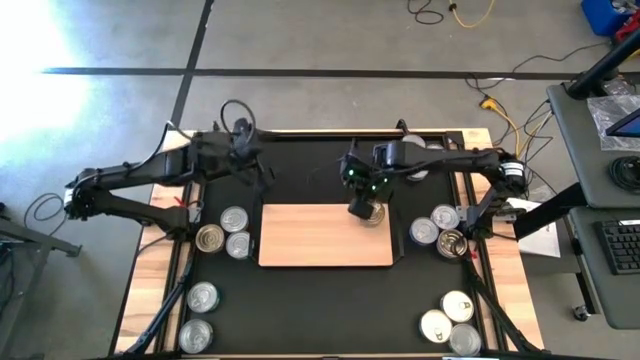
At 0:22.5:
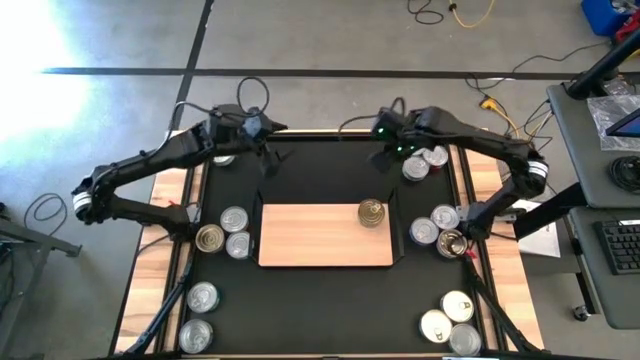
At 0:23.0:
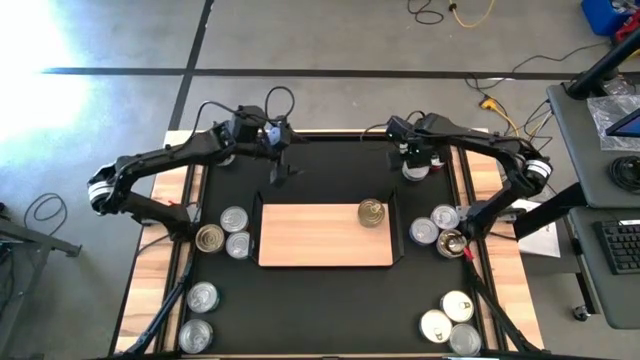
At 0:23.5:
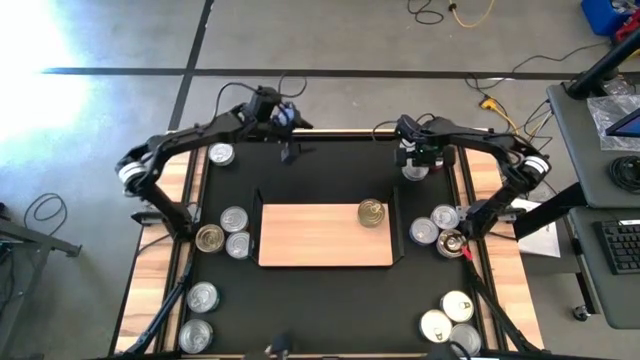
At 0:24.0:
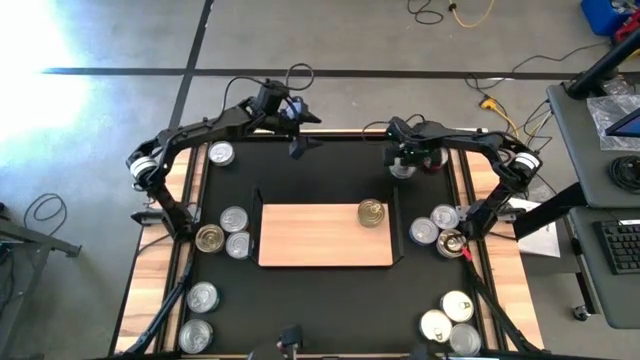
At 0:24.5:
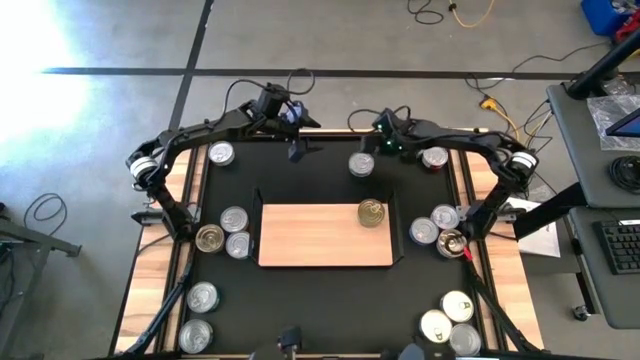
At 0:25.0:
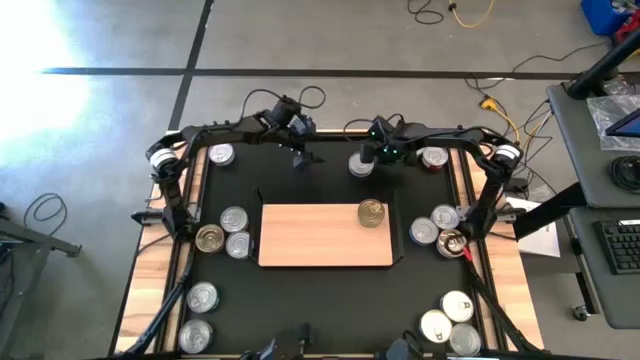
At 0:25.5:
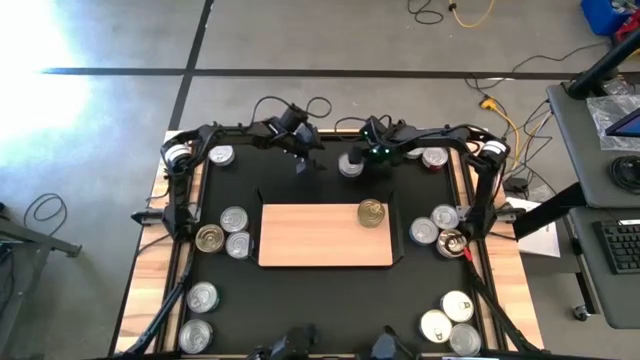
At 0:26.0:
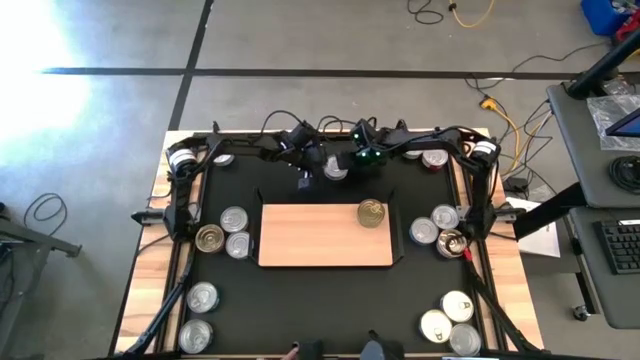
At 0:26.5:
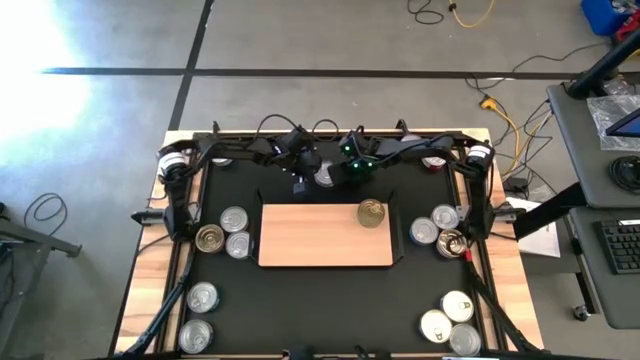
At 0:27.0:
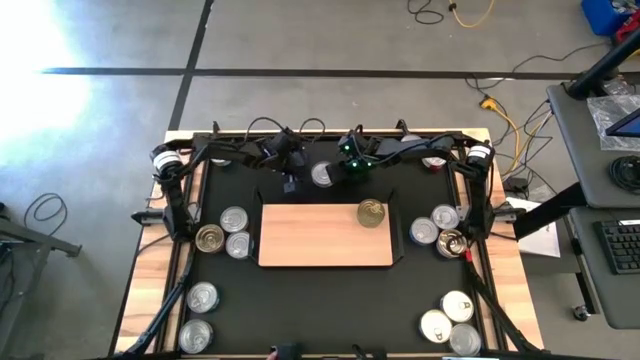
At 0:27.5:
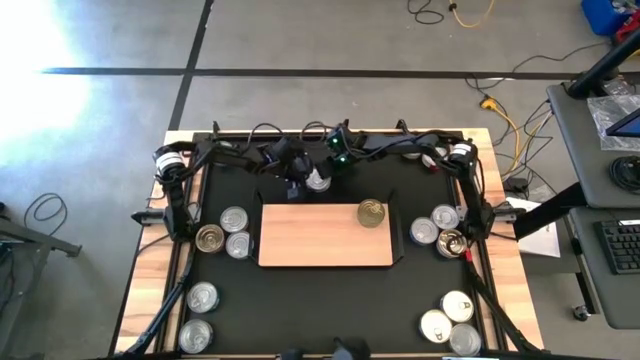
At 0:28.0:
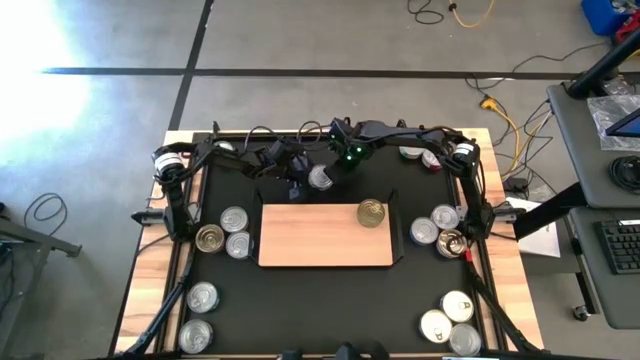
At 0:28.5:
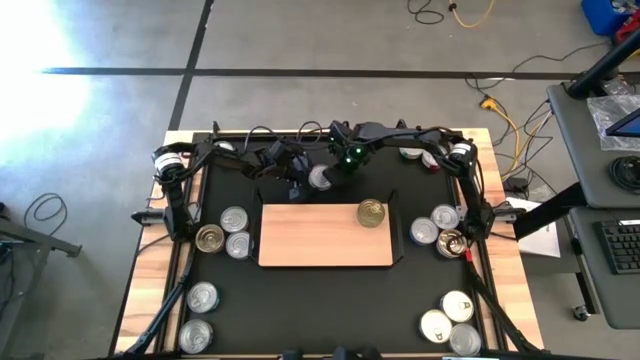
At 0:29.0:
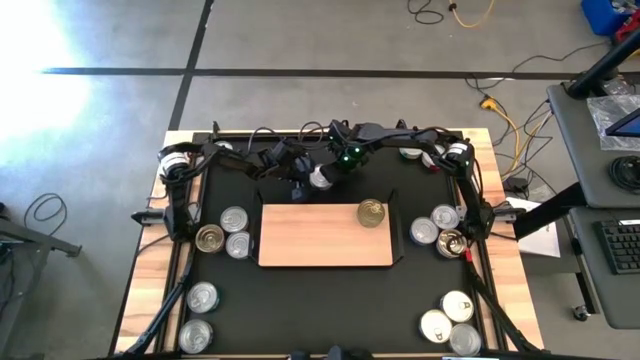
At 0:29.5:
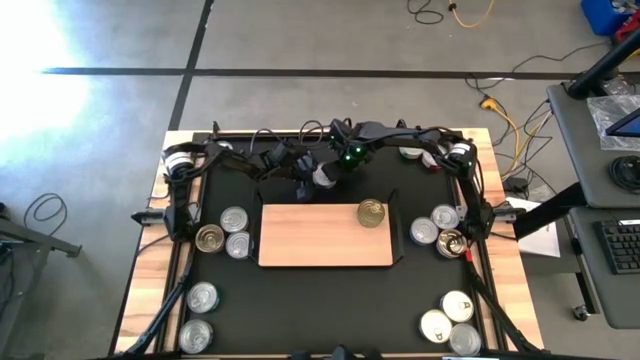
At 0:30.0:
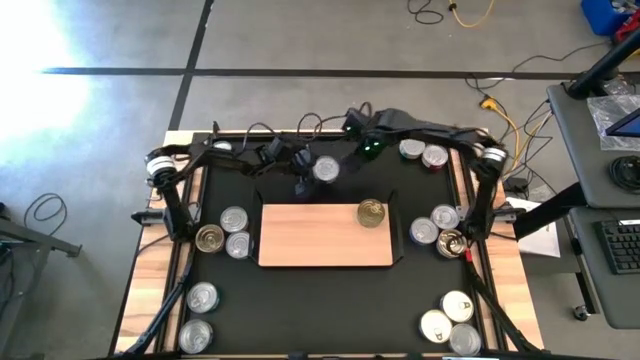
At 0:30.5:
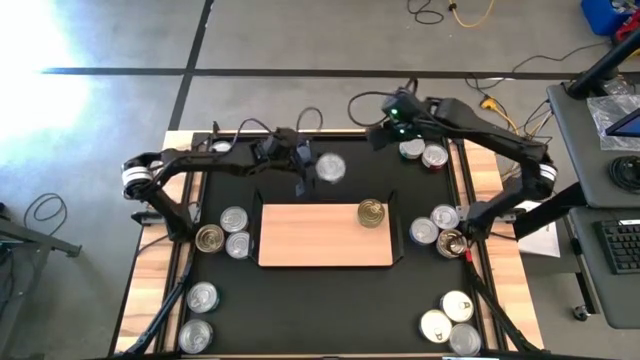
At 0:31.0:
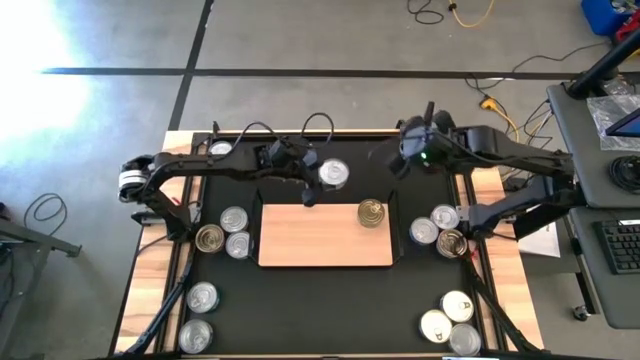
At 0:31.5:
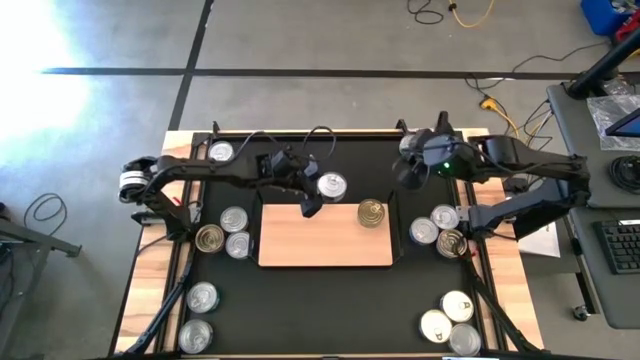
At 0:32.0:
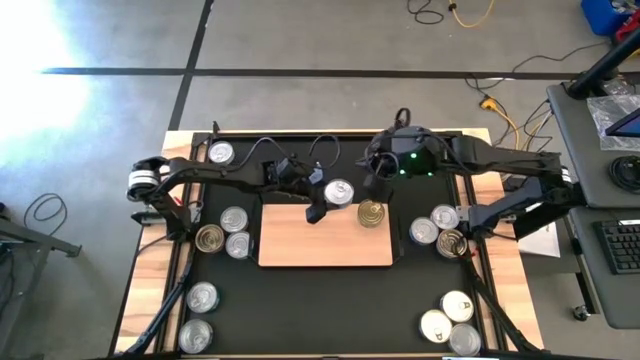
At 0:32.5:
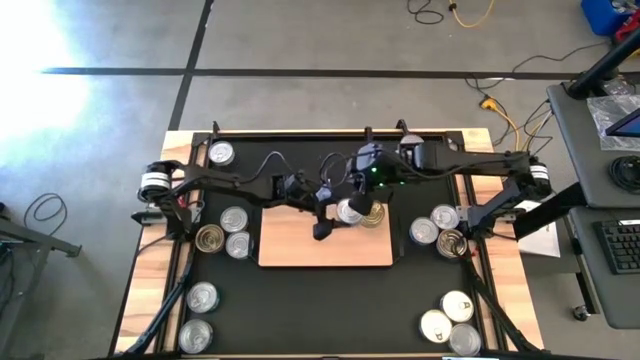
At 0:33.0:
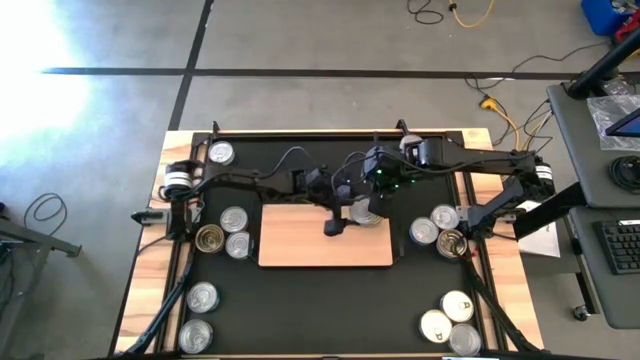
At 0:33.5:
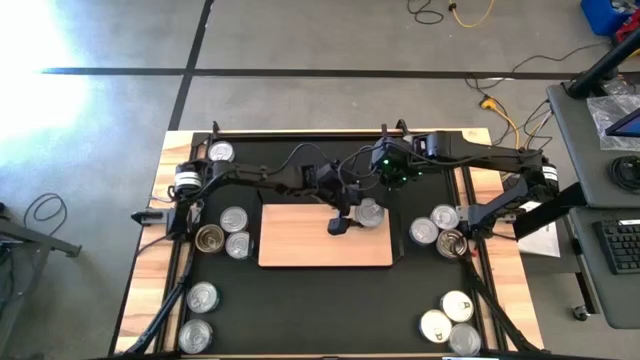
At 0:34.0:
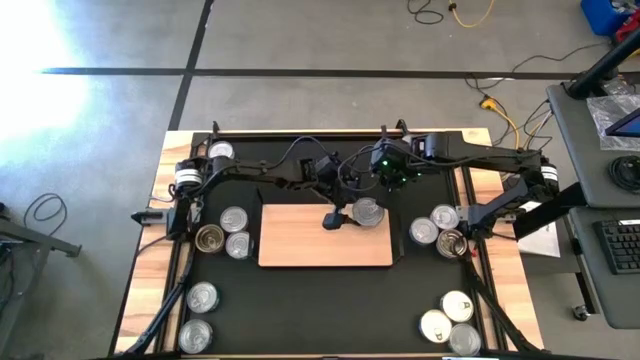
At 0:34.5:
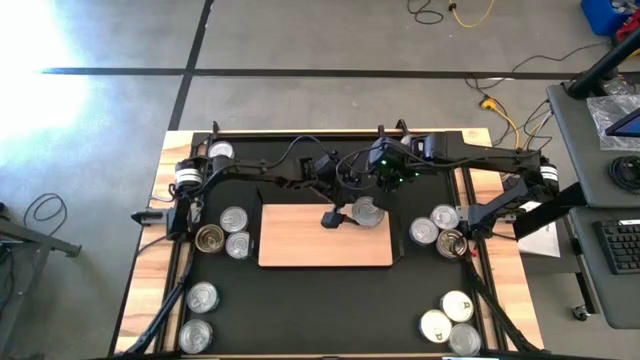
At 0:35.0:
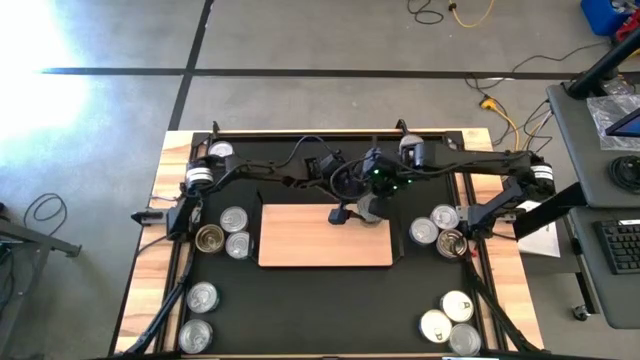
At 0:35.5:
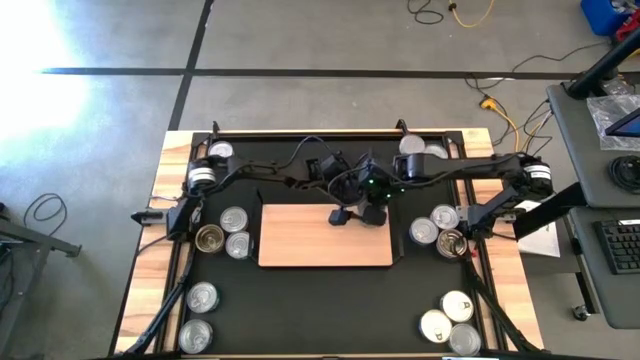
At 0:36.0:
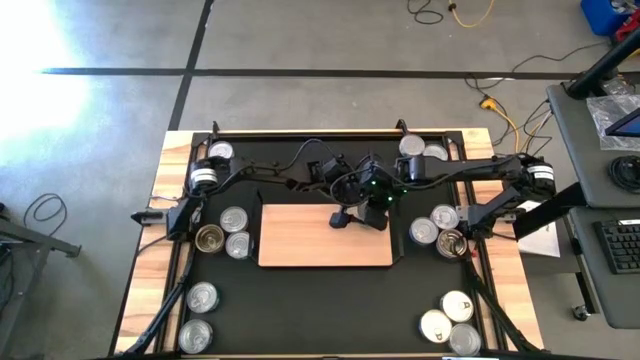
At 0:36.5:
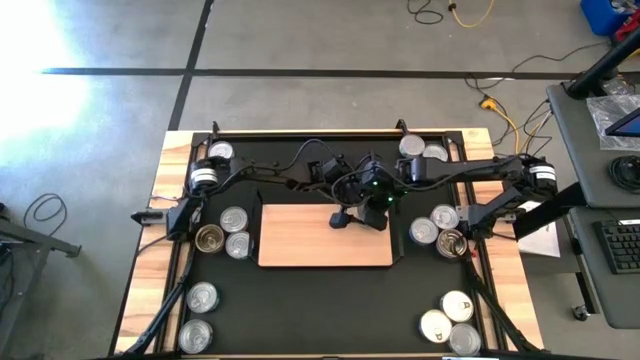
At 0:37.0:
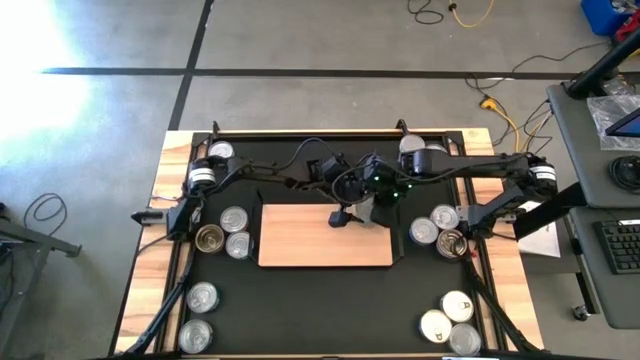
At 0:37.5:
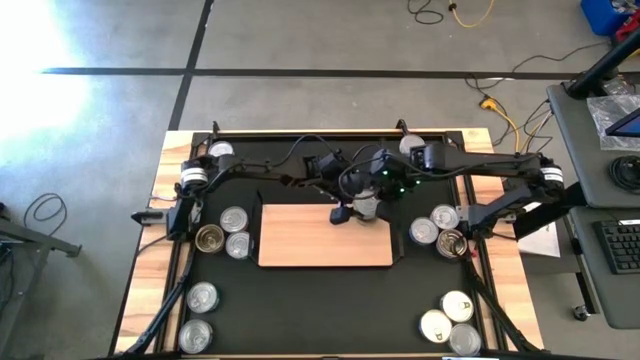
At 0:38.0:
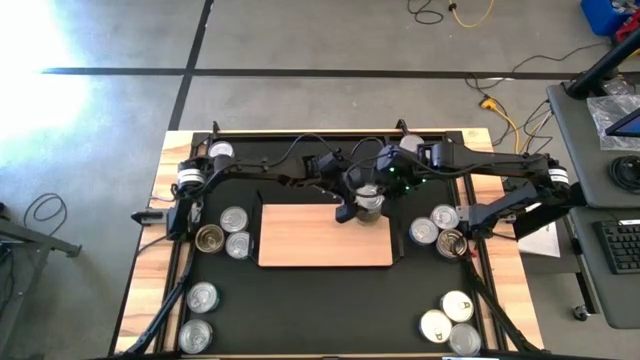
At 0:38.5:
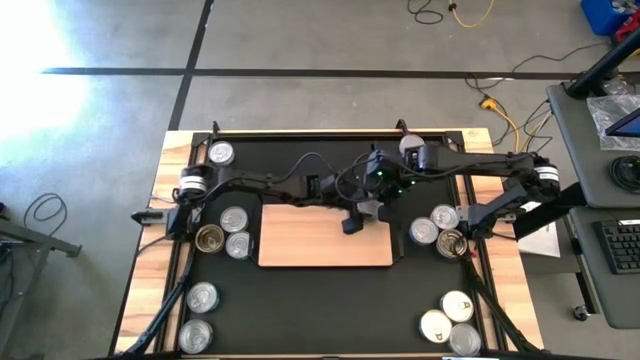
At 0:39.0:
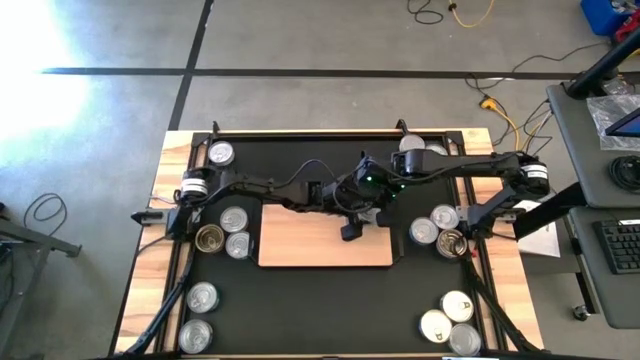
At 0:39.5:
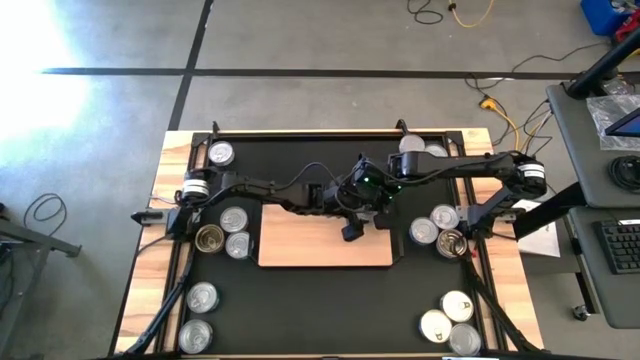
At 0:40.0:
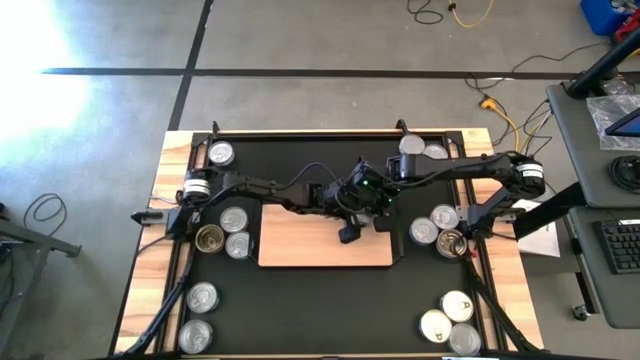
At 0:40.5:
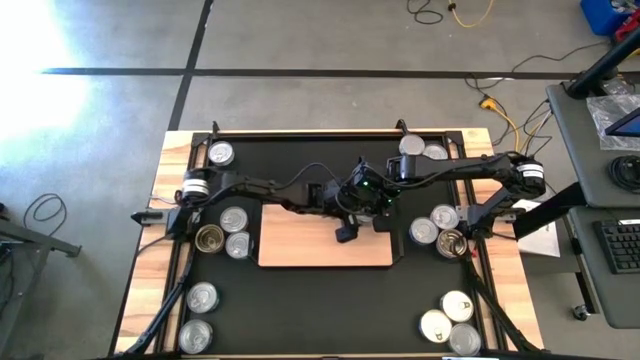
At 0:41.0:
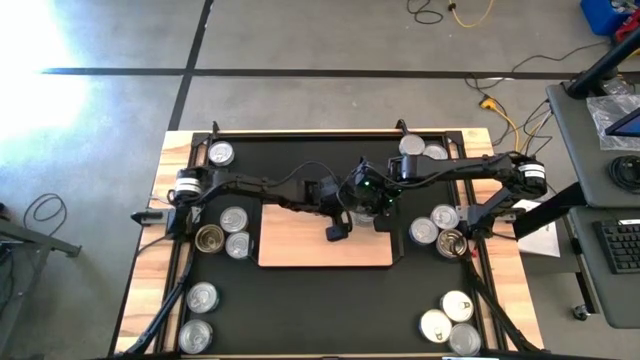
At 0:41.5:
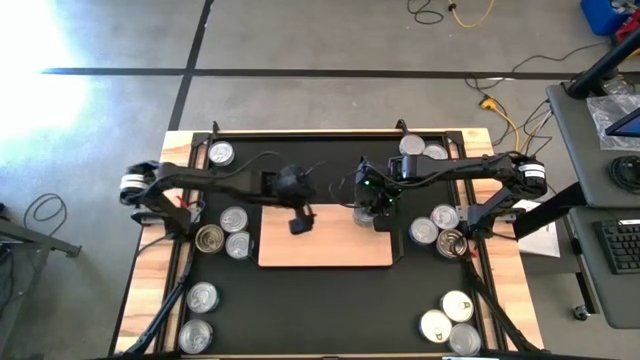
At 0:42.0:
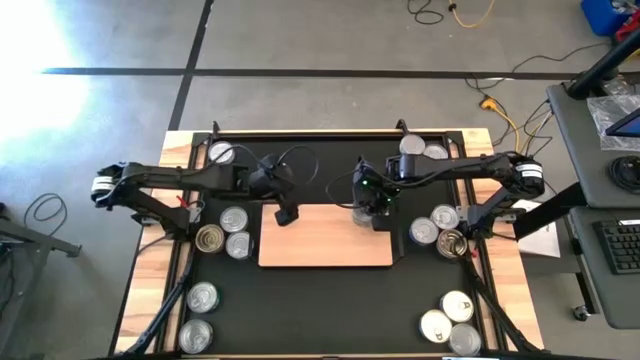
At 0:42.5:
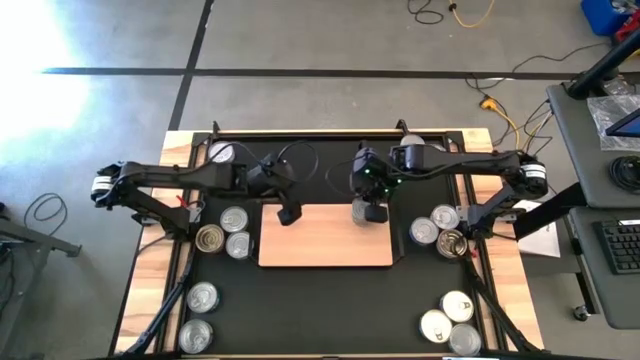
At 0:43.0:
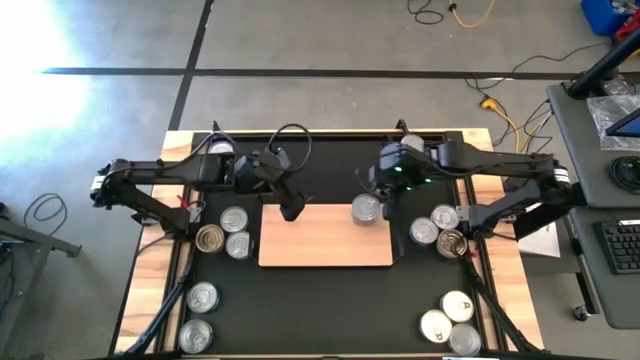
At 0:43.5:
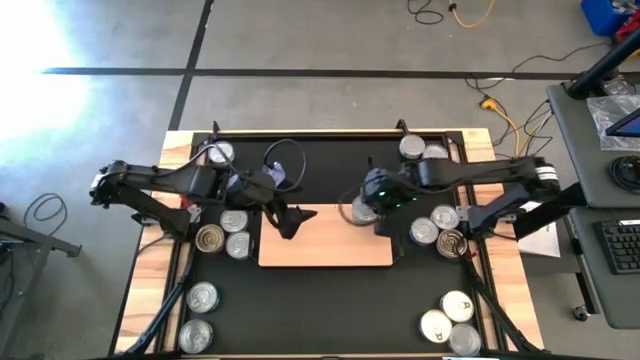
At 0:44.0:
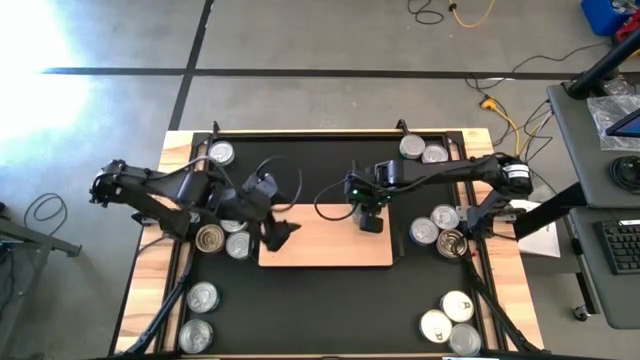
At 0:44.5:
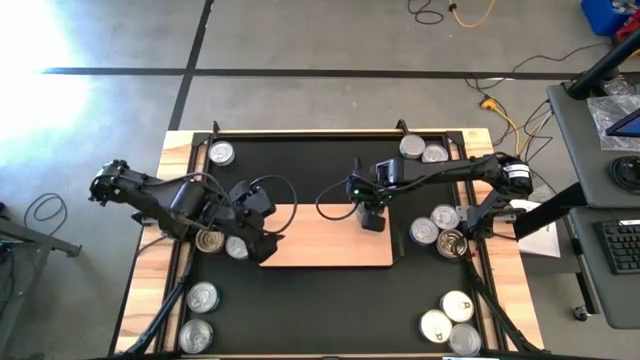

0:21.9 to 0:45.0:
Task: Stack canned seafood by type on shelf
Stack the green tuna can on the green can
